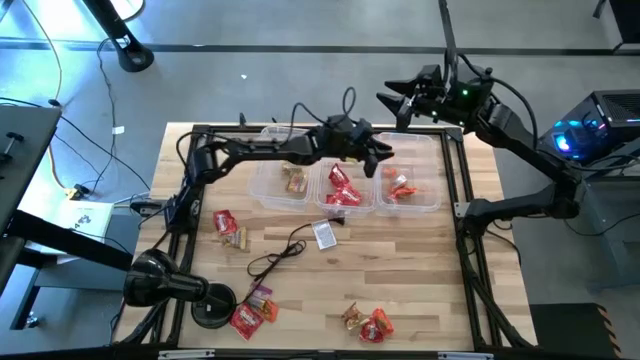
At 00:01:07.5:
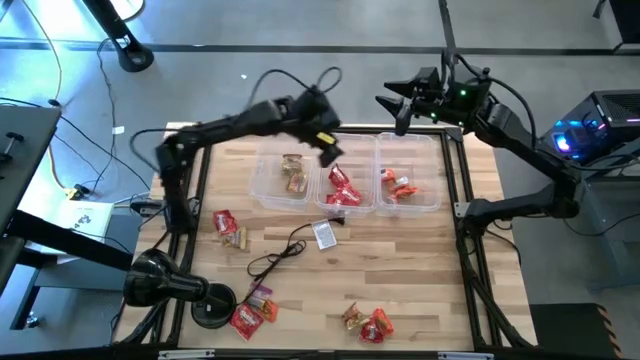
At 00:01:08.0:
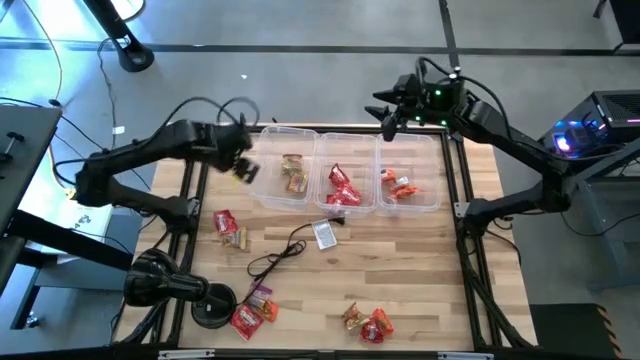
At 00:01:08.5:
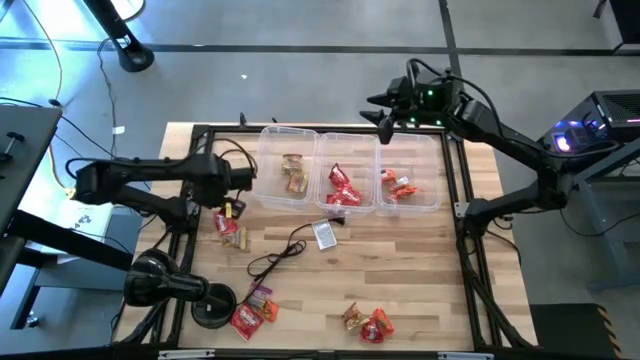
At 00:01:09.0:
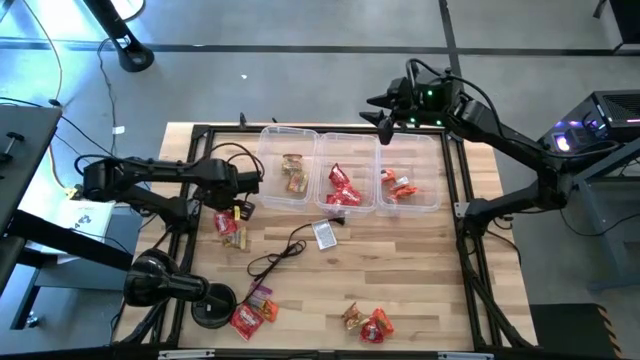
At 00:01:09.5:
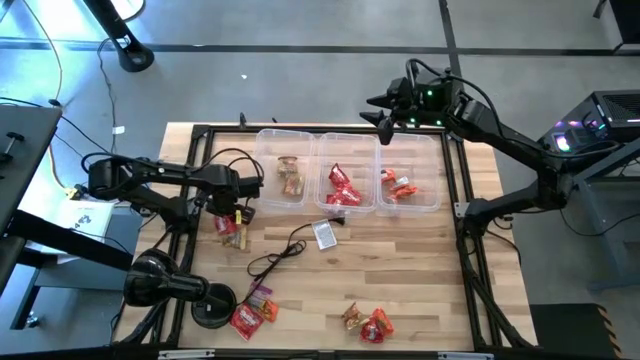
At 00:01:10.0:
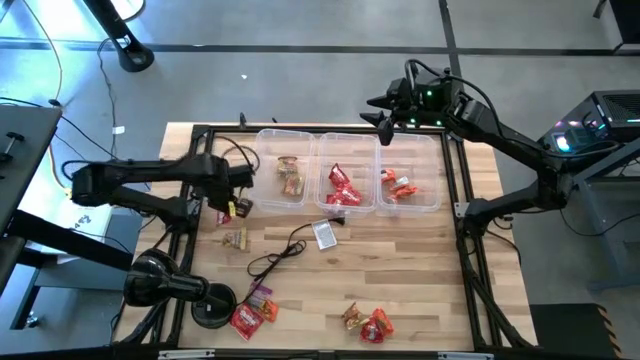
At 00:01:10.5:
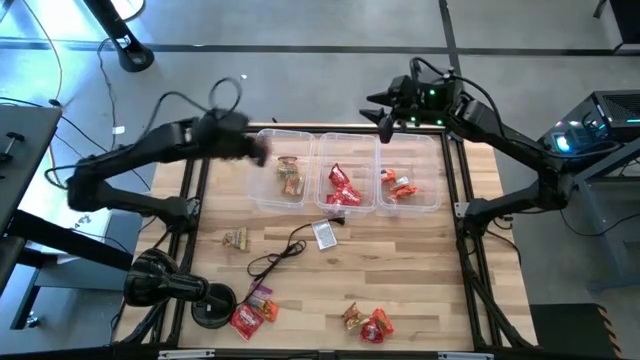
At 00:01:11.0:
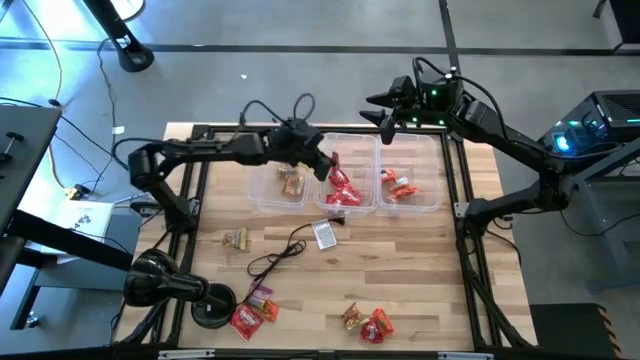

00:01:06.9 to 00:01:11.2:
Task: Sort candy
Put the red candy pack into the center transparent bin

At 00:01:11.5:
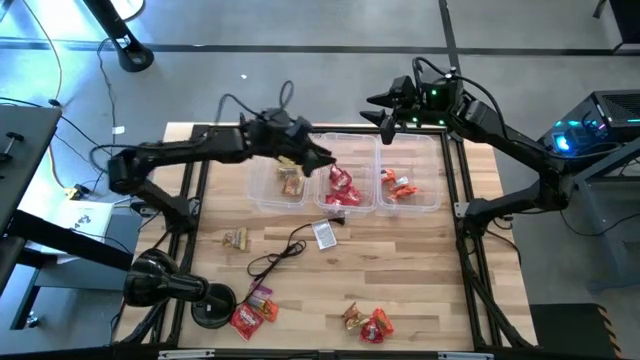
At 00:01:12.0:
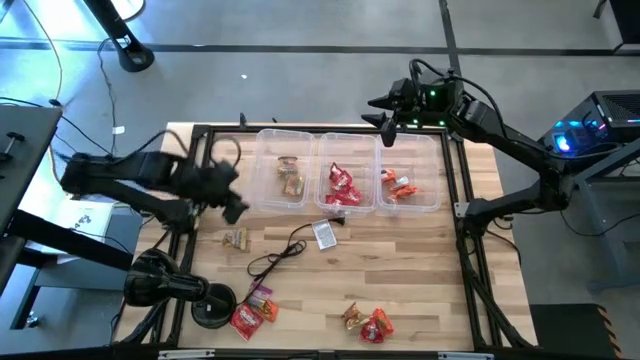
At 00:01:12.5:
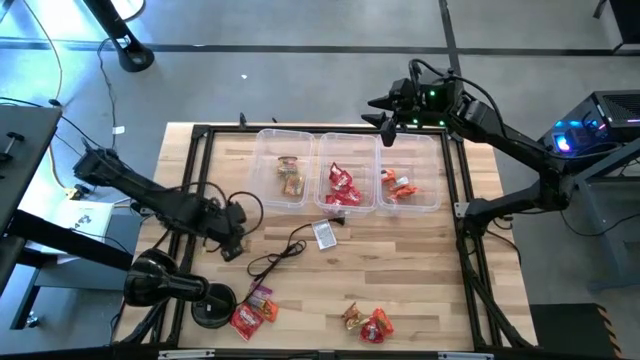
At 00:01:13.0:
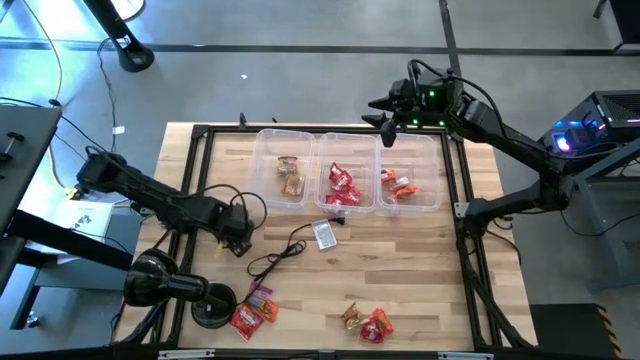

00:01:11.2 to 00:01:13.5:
Put the gold candy pack into the left transparent bin

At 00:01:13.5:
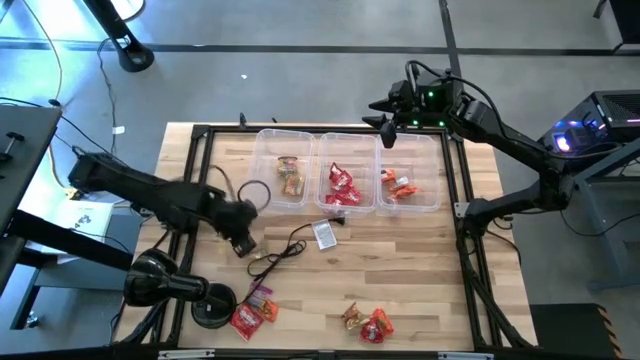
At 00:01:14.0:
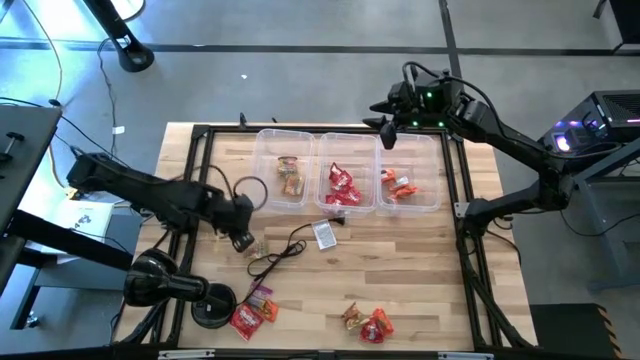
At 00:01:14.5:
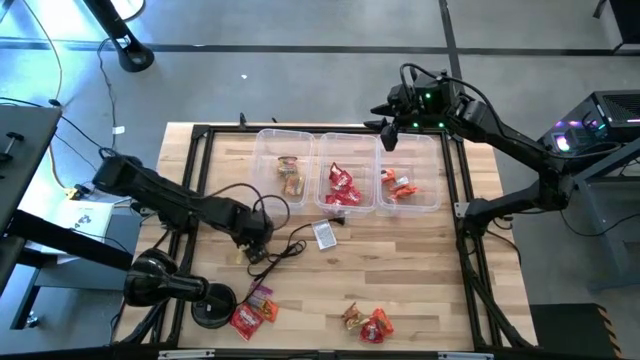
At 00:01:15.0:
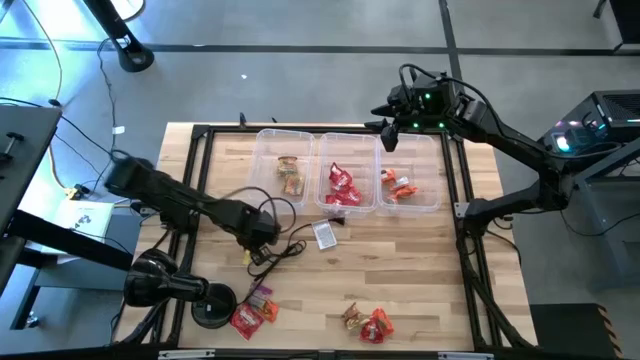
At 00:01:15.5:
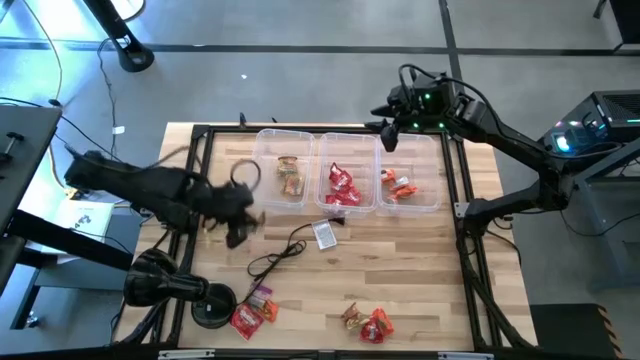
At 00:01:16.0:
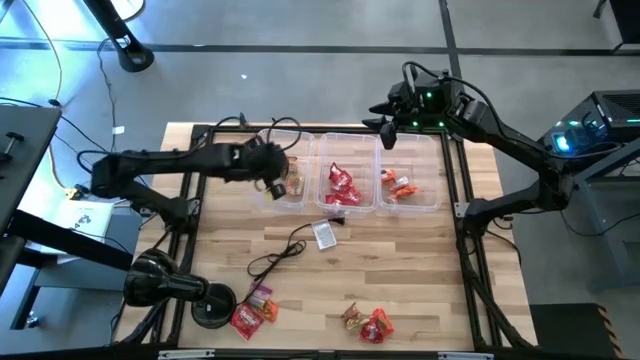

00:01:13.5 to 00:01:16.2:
Put the gold candy pack into the left transparent bin

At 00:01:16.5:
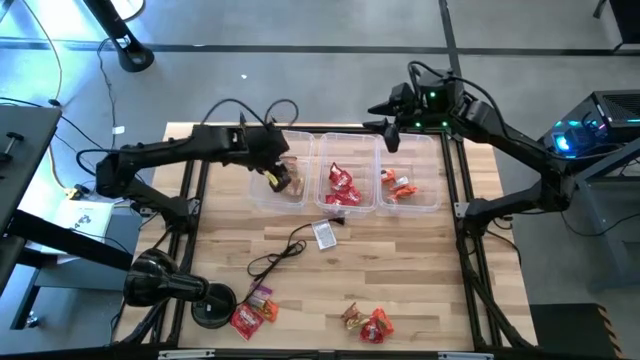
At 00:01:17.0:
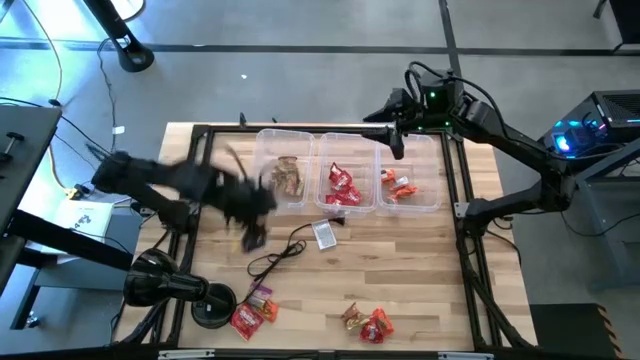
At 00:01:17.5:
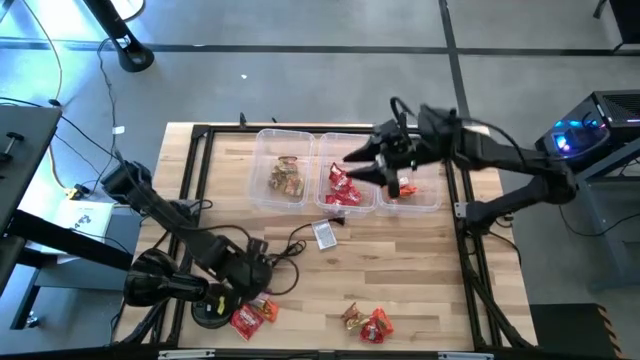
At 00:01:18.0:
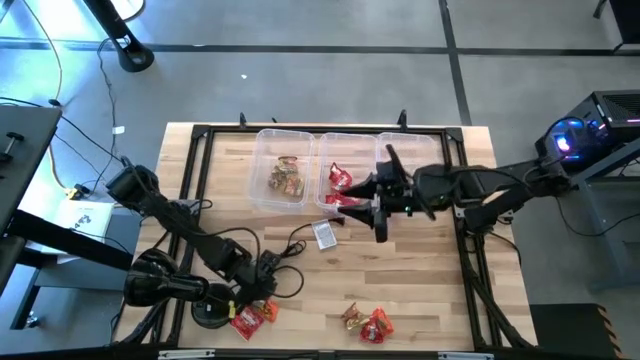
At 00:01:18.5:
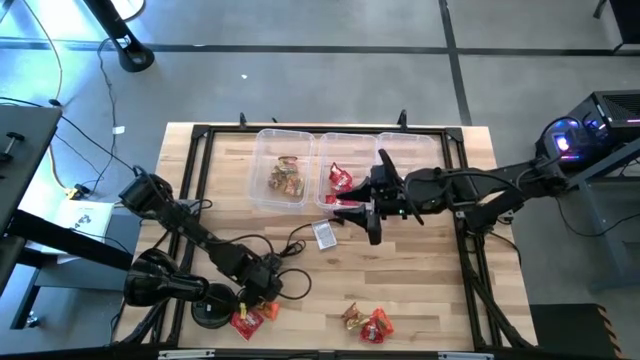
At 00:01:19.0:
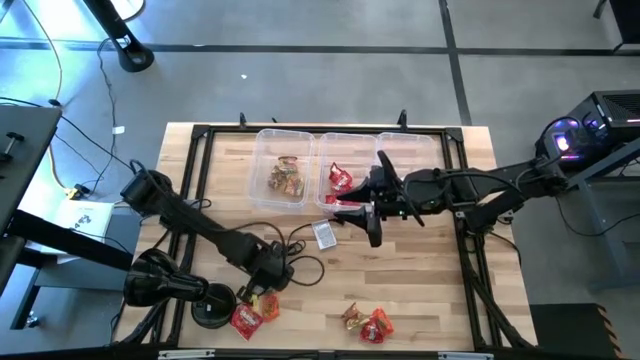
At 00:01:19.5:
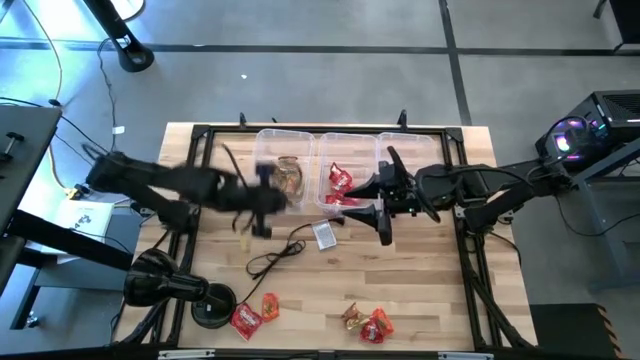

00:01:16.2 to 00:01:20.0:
Put the gold candy pack into the left transparent bin

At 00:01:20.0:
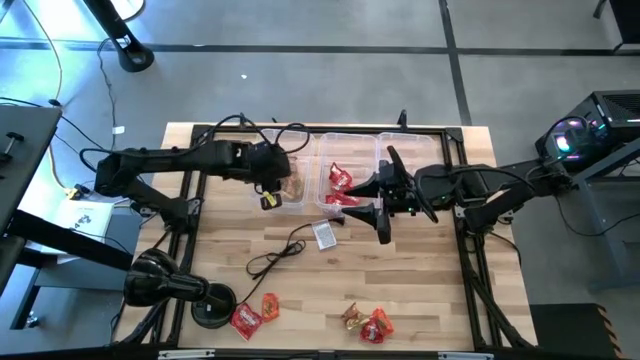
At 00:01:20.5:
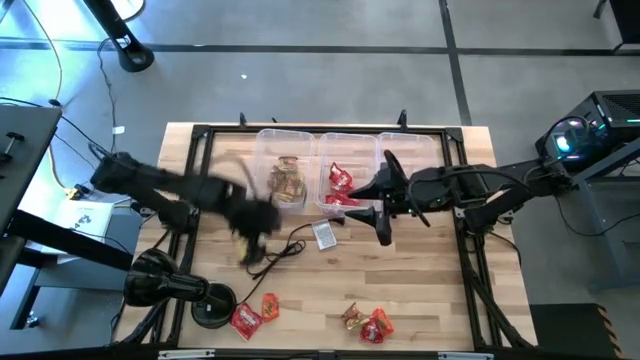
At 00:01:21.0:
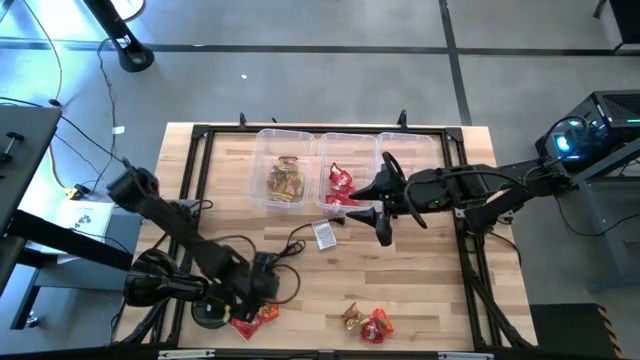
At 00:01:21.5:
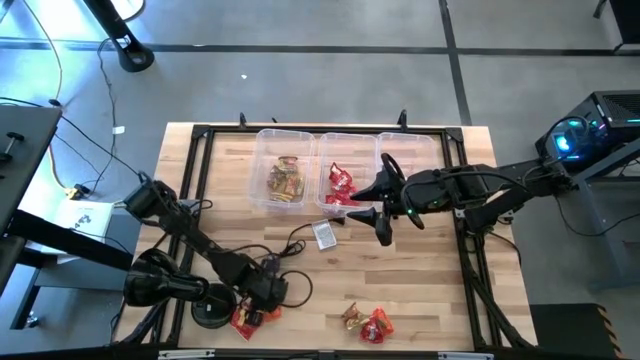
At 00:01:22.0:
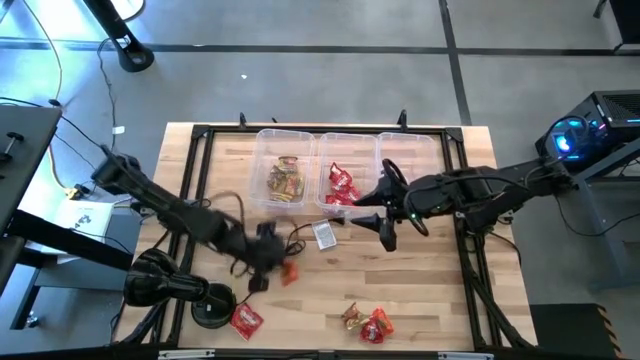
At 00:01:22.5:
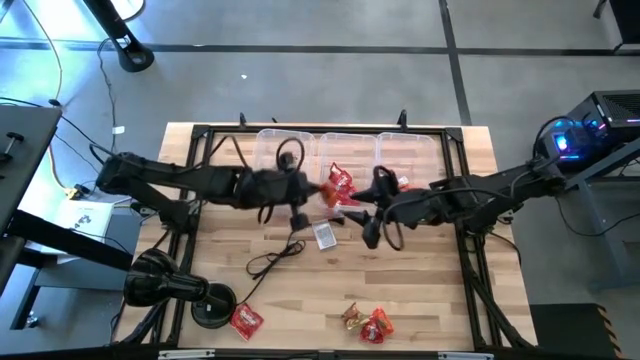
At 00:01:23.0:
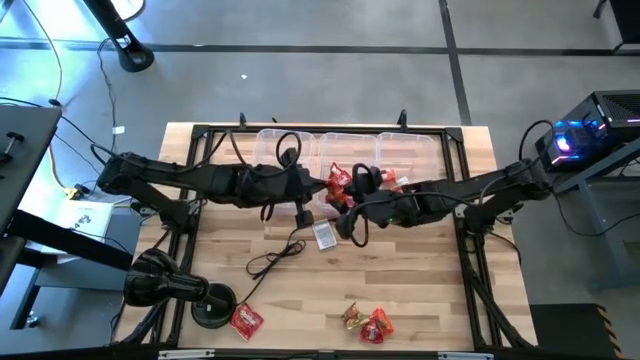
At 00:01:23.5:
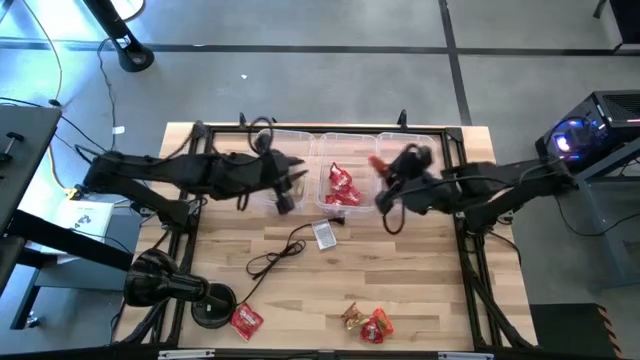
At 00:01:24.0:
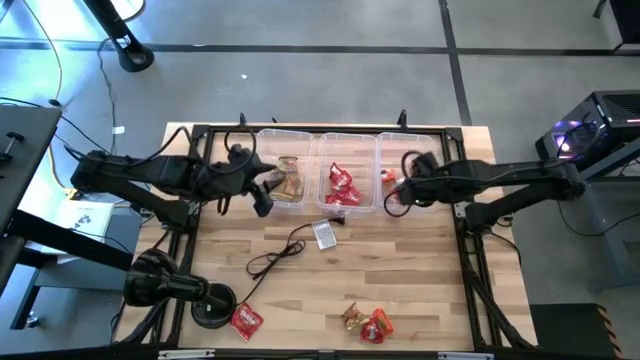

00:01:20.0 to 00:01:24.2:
Put the orange candy pack into the right transparent bin

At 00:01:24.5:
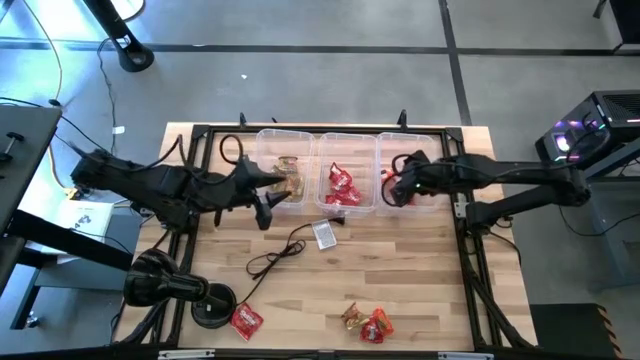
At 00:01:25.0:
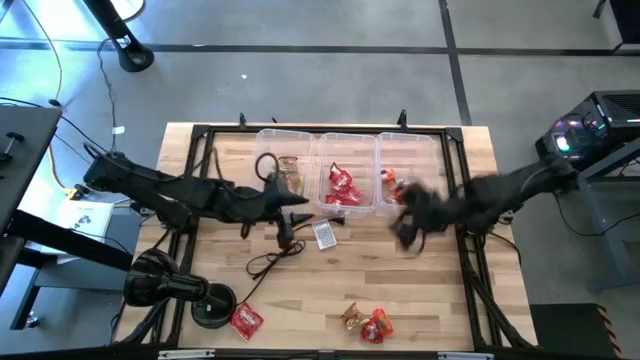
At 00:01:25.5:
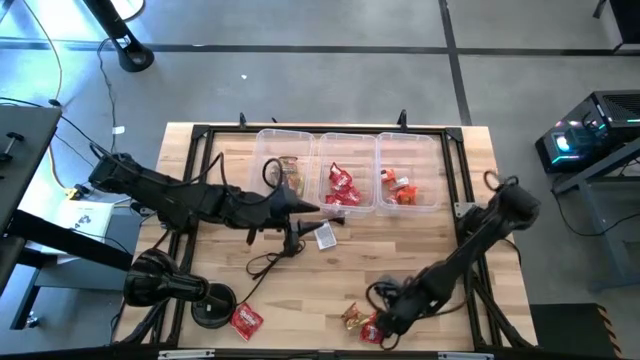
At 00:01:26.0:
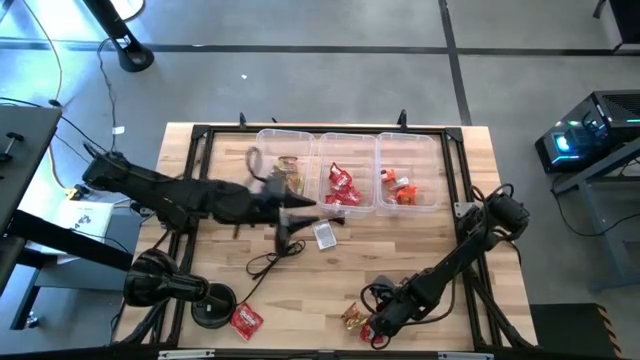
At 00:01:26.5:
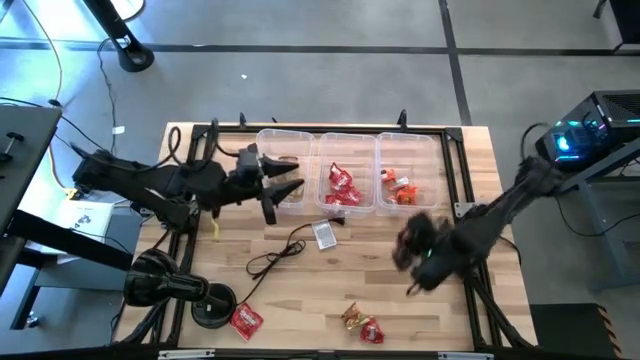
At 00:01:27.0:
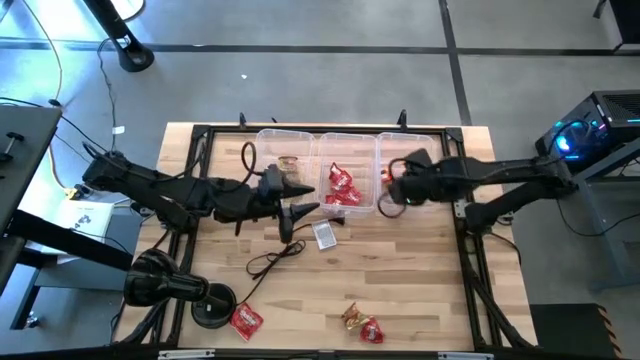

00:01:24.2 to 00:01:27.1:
Put the orange candy pack into the right transparent bin

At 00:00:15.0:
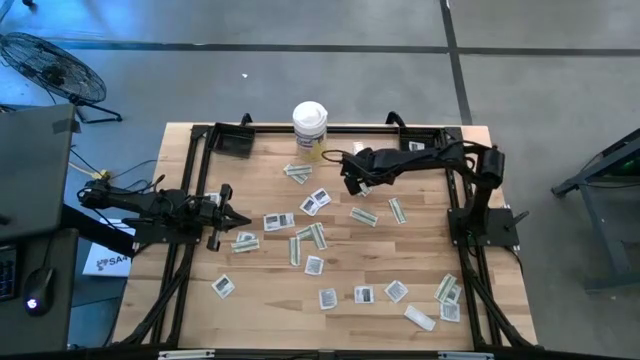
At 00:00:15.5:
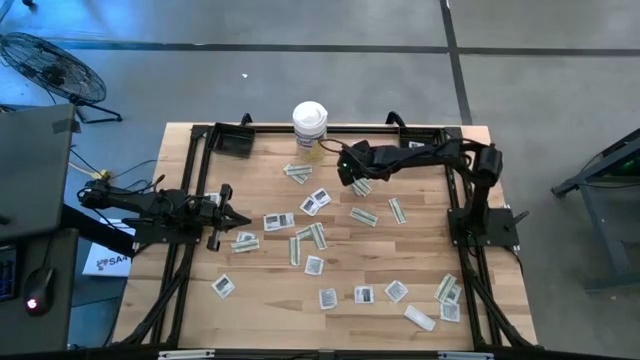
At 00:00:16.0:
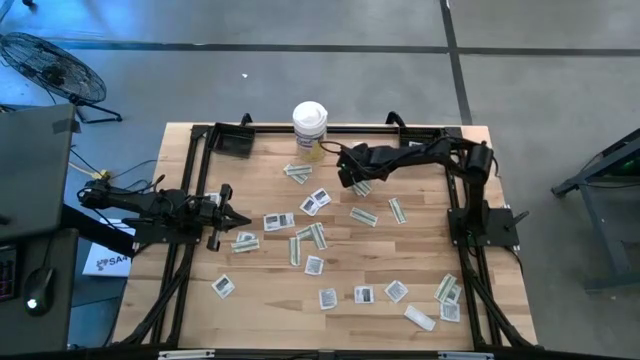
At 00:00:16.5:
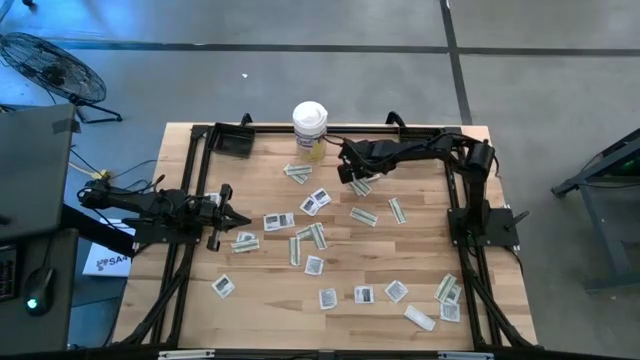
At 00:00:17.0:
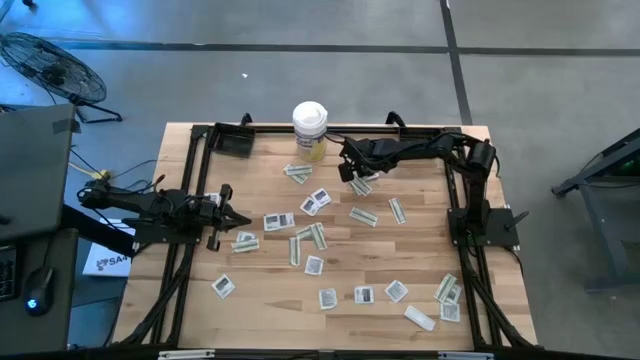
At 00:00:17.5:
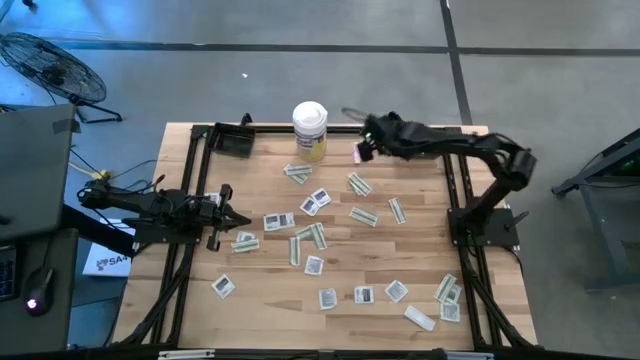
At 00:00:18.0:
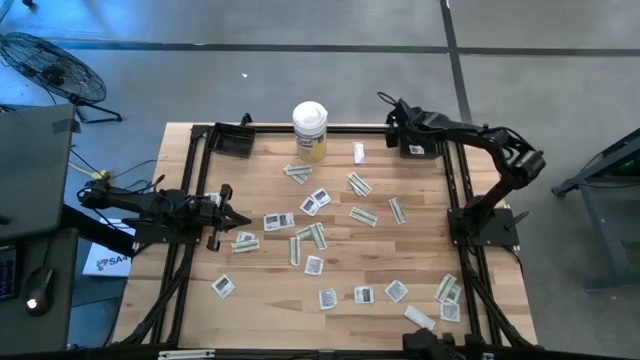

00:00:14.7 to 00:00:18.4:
Task: Pick & Place First Aid Supplies
Put the black towelette pack into the right black basket
